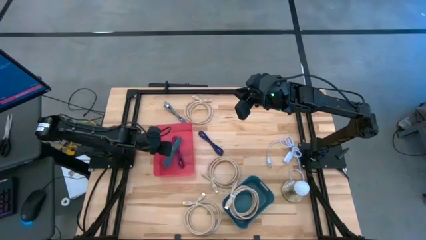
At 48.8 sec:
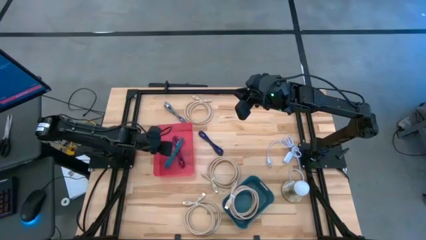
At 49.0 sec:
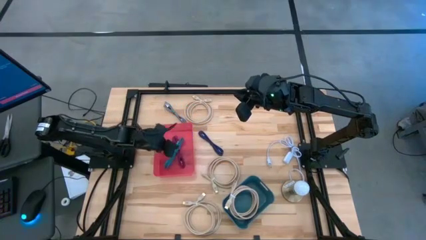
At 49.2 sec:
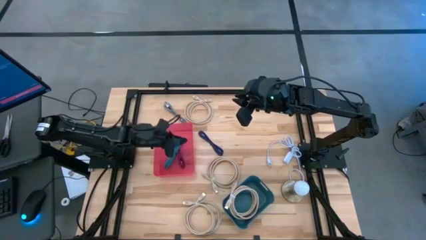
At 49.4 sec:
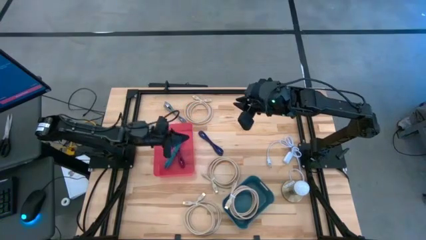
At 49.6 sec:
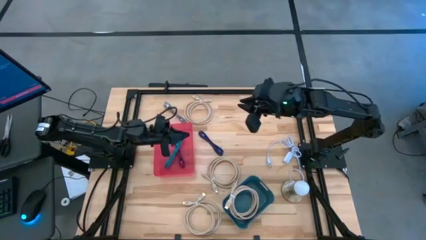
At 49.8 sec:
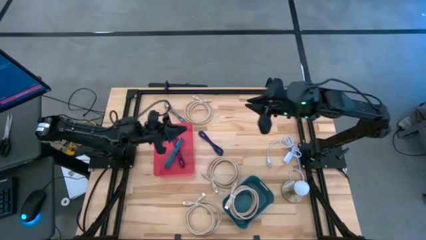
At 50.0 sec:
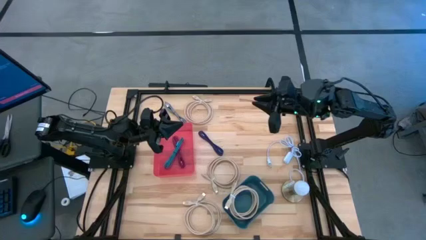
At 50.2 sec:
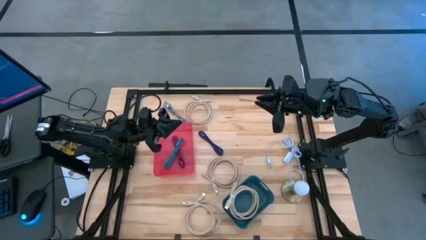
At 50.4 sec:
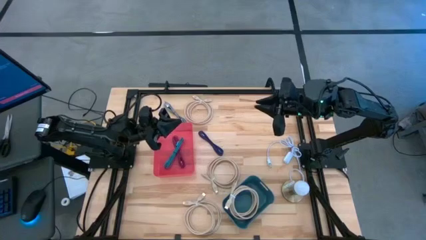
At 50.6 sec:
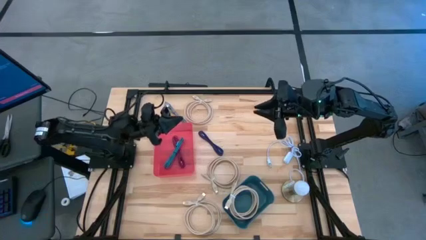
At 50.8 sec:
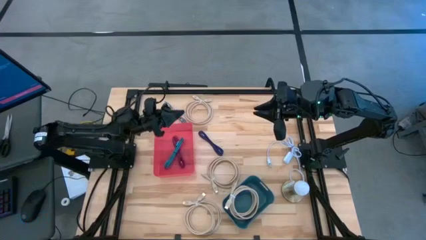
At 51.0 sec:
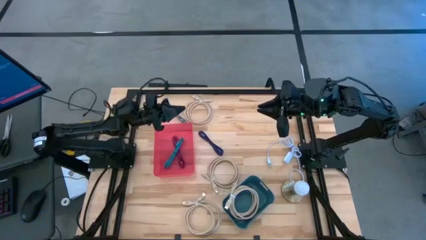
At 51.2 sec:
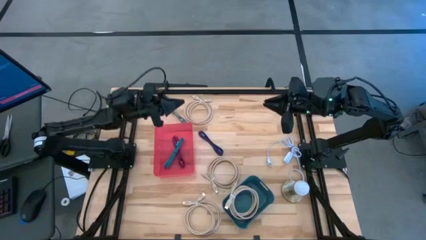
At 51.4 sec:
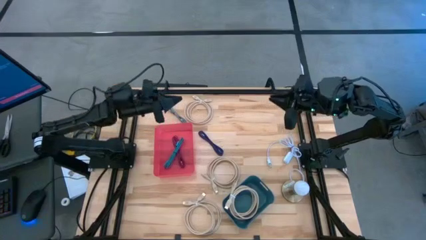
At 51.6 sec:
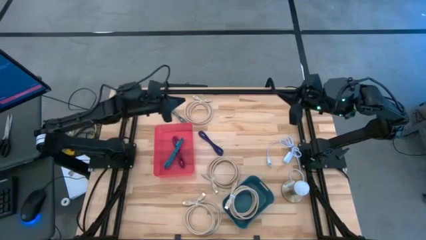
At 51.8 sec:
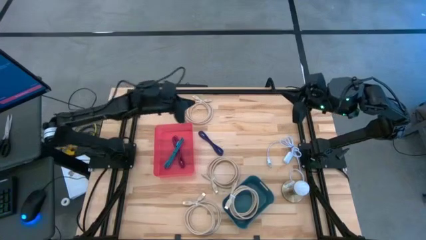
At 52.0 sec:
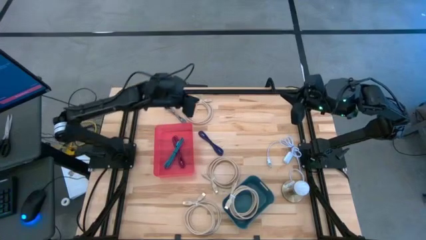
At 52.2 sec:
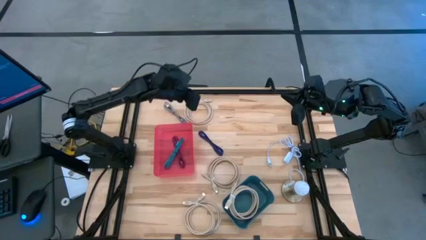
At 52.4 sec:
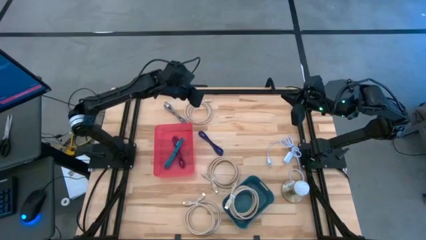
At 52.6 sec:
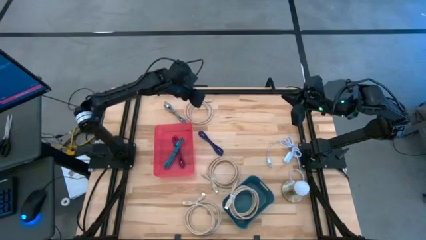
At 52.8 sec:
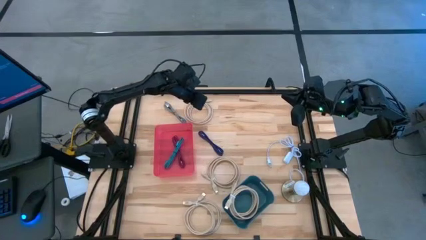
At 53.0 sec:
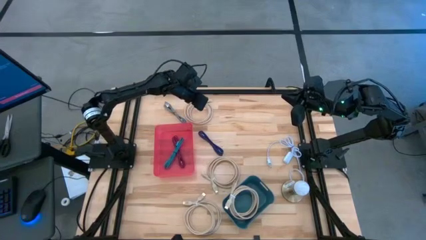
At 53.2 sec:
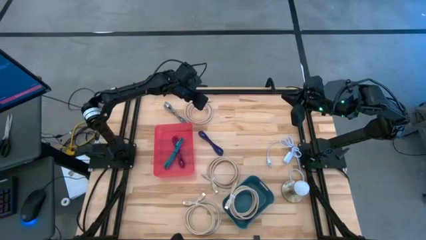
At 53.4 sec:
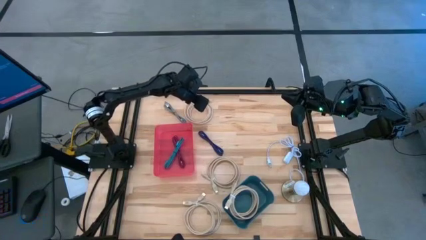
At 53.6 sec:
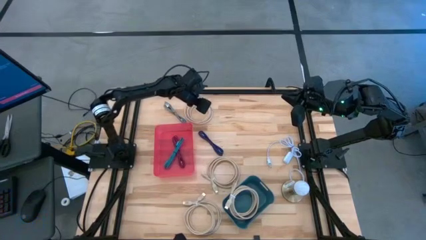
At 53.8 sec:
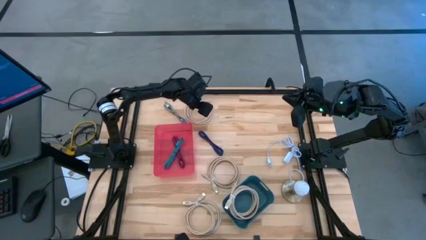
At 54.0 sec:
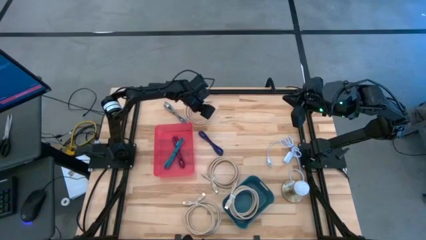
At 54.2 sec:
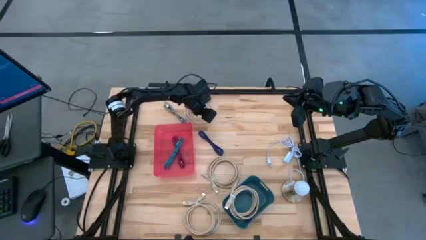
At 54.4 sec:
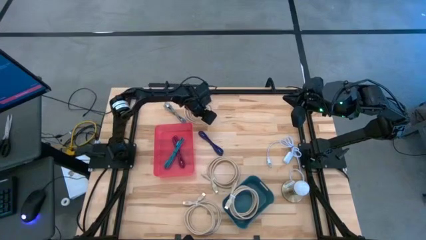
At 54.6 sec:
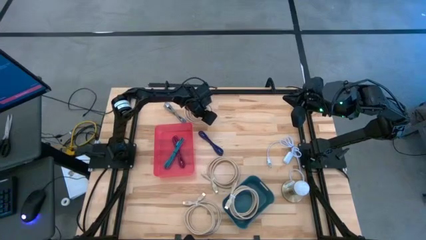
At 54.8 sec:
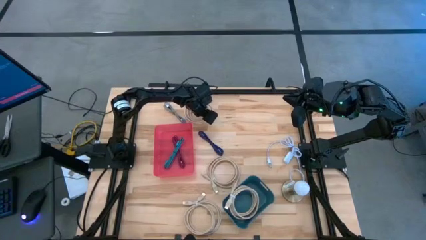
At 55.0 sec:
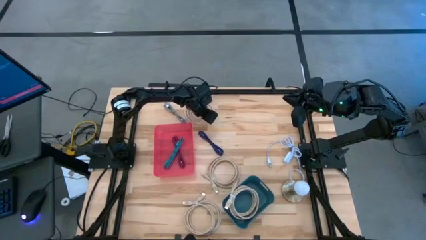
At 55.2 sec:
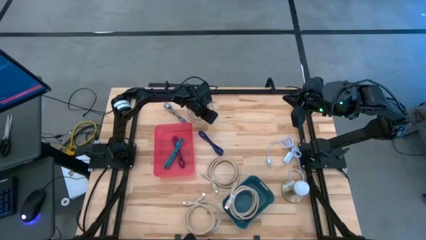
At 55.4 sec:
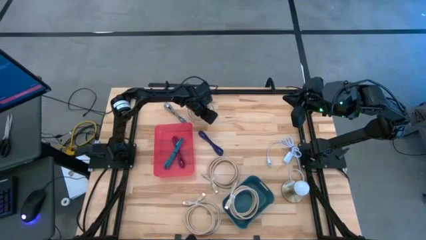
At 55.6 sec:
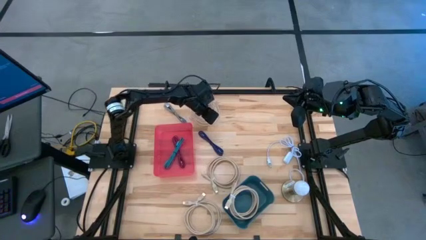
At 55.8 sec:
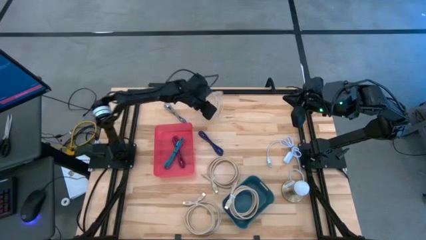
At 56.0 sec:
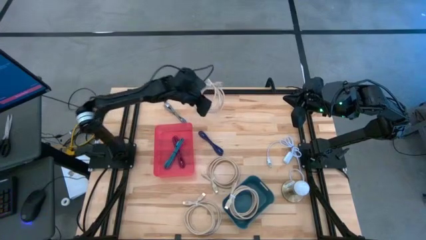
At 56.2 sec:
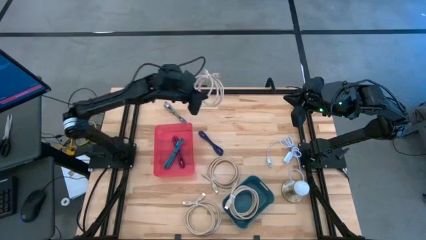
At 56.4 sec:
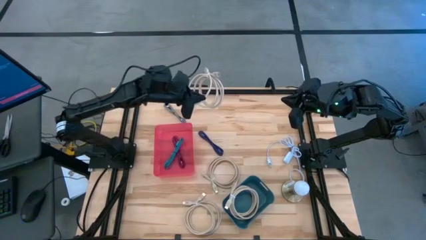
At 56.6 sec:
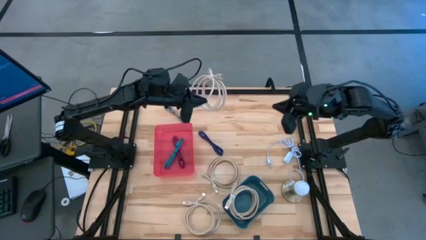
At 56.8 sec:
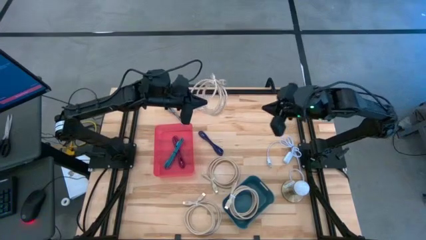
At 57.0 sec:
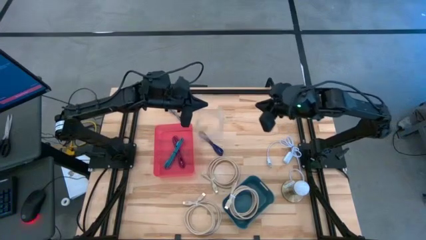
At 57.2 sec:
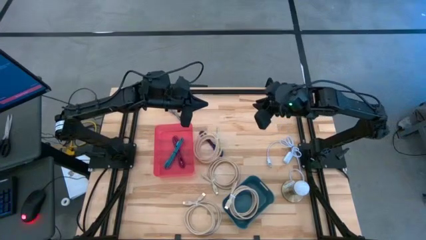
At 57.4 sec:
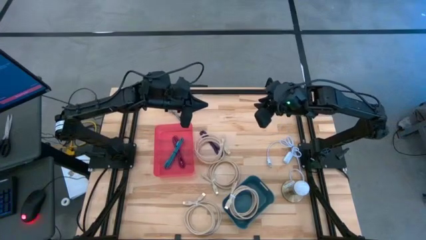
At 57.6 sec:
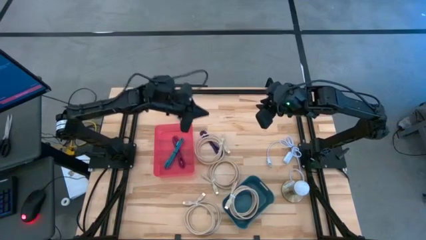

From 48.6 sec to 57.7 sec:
Task: Pick & Place USB Port
Put the white HDMI cable into the blue bin

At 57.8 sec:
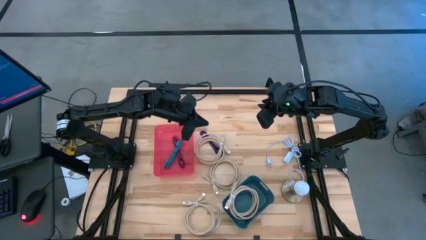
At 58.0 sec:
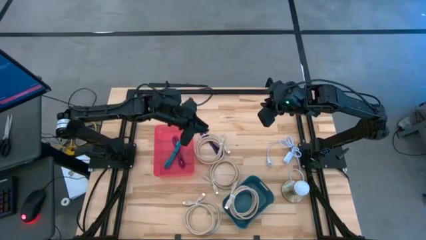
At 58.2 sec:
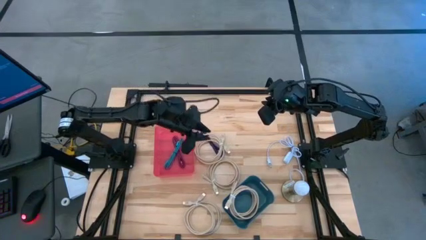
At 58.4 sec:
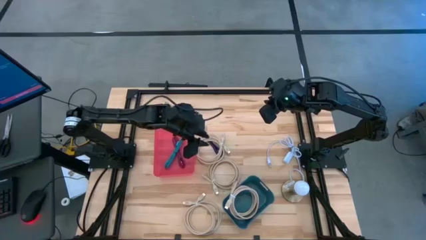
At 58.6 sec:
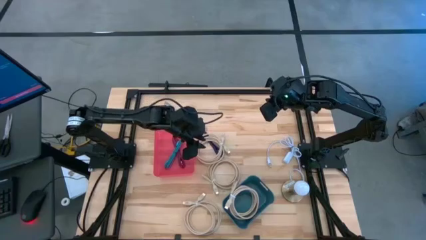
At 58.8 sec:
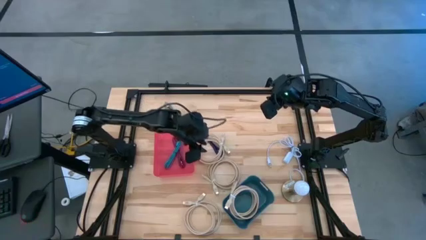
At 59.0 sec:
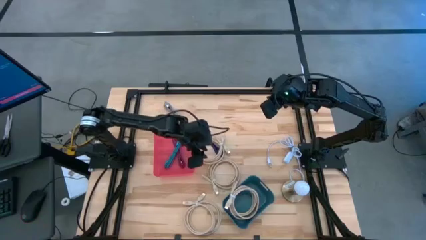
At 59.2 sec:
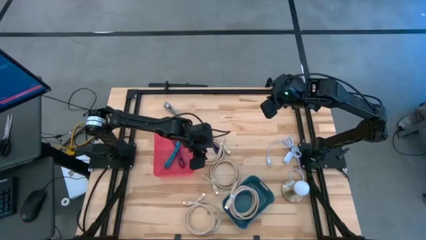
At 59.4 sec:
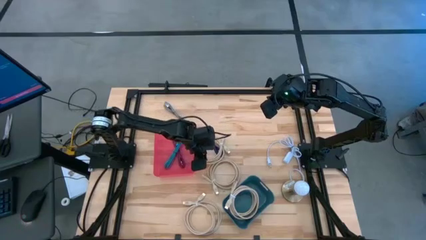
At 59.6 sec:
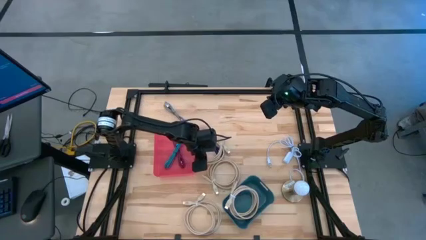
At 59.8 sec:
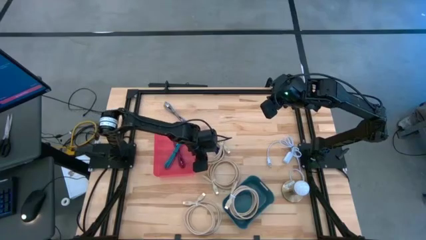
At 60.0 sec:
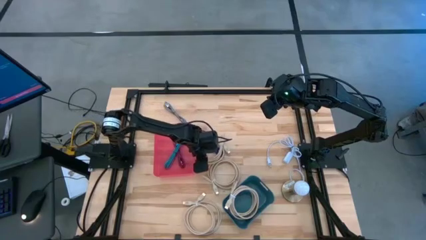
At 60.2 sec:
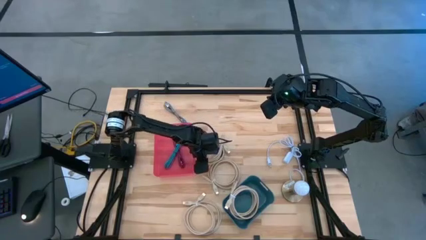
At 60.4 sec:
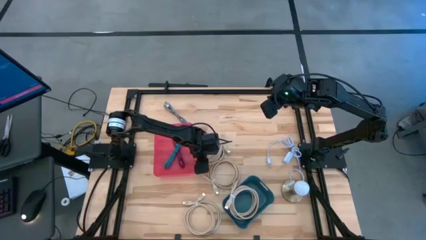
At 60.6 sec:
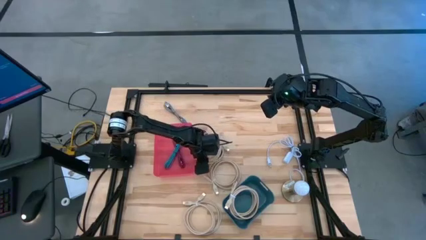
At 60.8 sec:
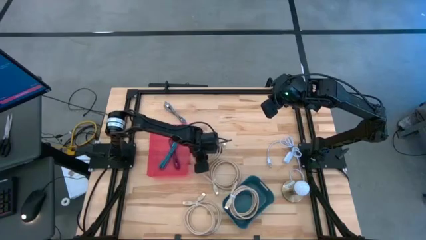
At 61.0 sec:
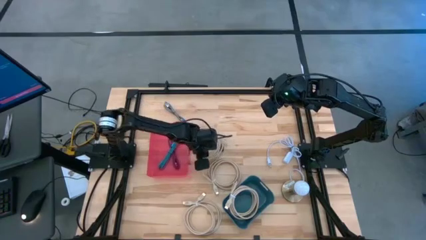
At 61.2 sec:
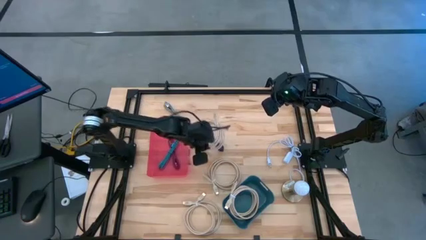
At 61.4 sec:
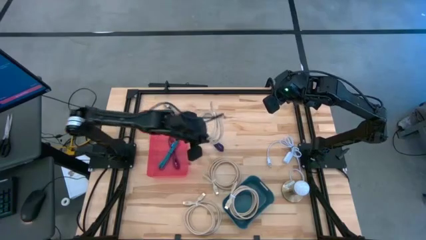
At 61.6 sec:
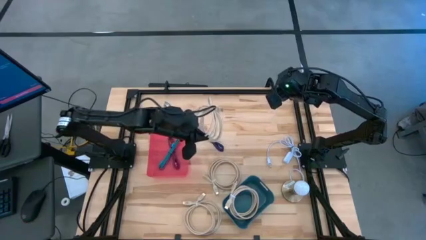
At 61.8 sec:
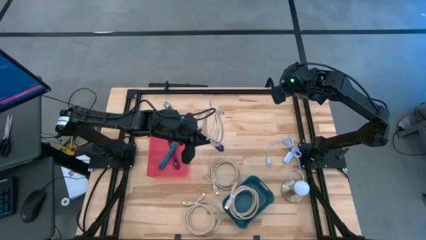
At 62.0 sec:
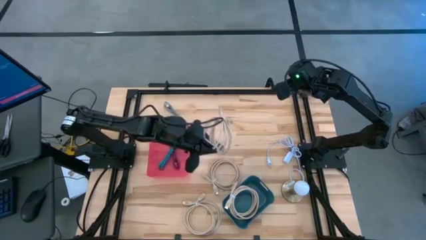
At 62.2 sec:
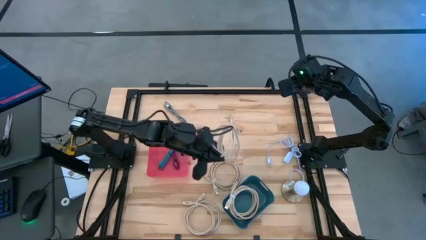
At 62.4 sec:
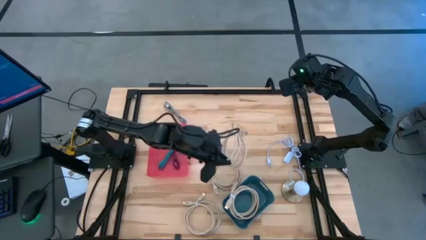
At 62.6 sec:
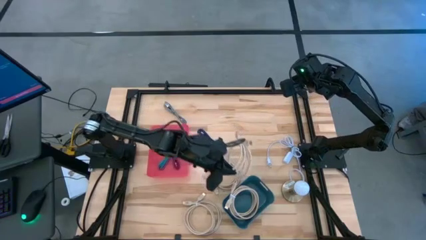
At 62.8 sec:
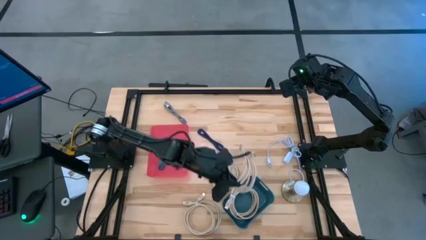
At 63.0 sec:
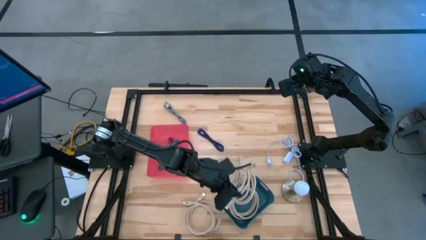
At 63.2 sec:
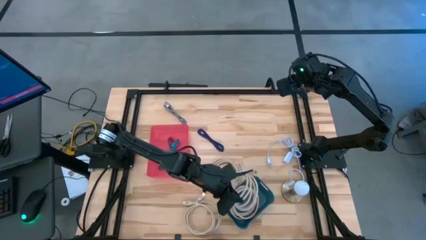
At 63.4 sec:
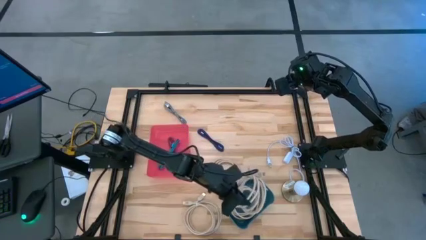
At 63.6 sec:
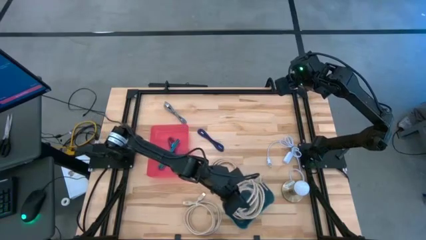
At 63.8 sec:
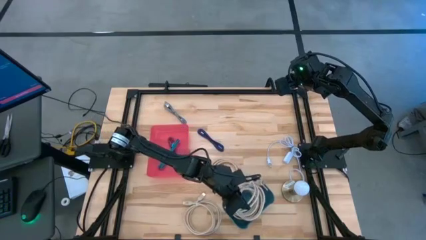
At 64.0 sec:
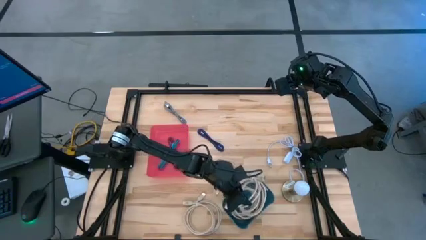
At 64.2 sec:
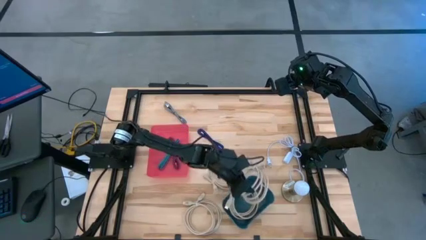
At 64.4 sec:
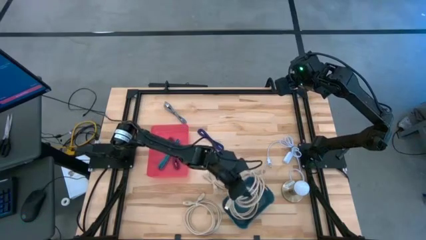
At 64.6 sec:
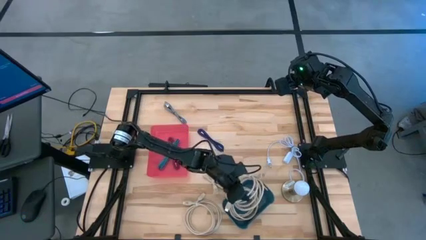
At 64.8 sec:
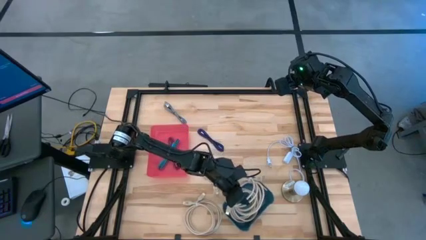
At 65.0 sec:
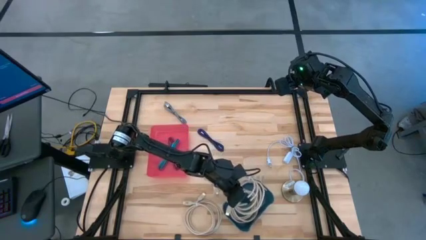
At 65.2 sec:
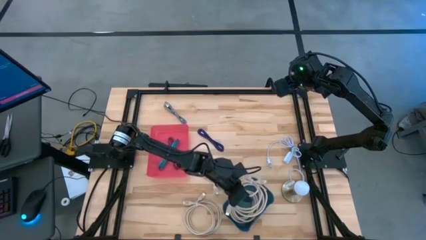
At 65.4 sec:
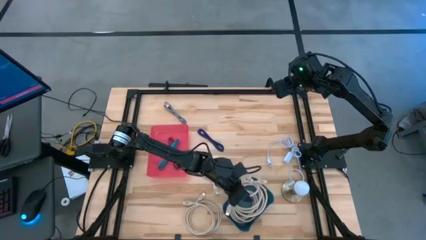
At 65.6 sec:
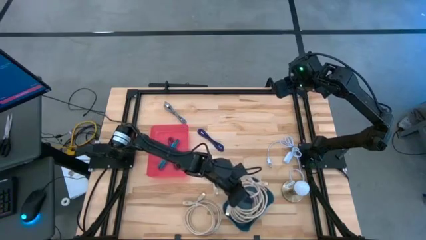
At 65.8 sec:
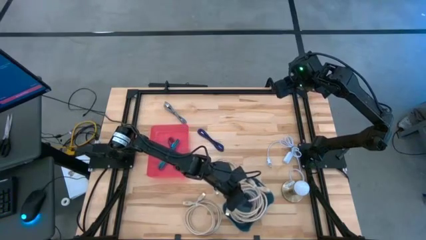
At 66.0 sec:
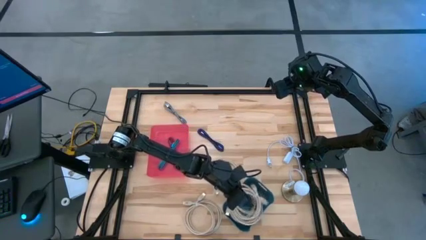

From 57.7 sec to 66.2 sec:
Put the white HDMI cable into the blue bin
